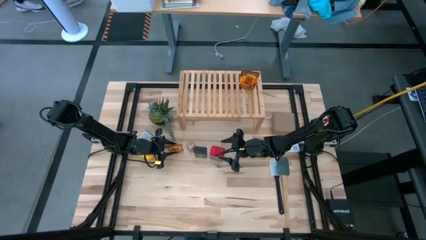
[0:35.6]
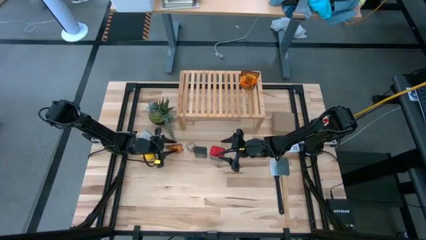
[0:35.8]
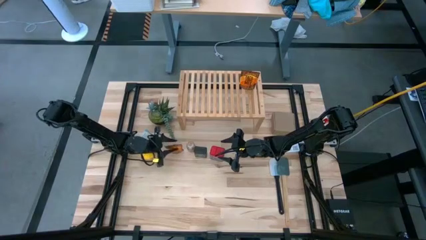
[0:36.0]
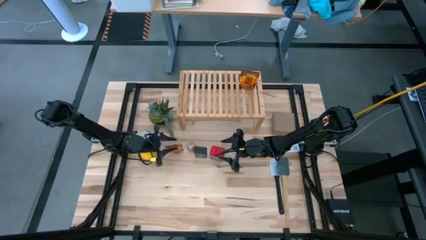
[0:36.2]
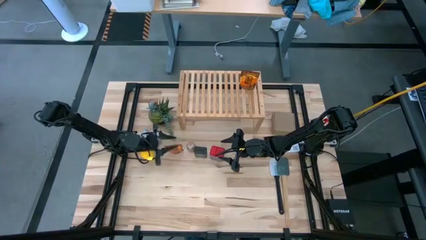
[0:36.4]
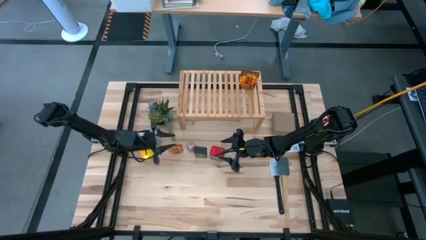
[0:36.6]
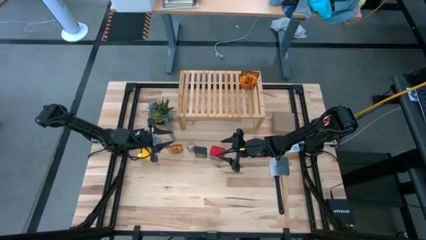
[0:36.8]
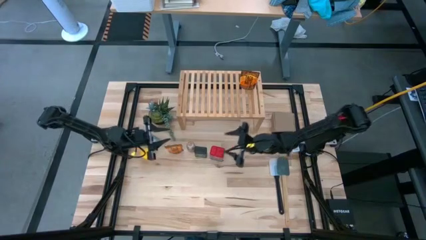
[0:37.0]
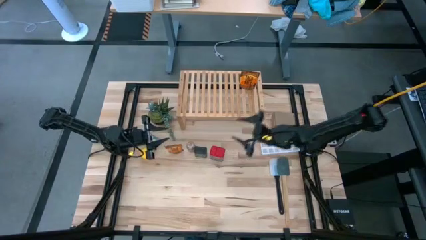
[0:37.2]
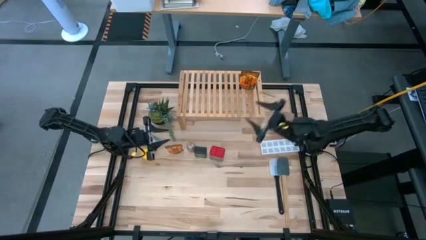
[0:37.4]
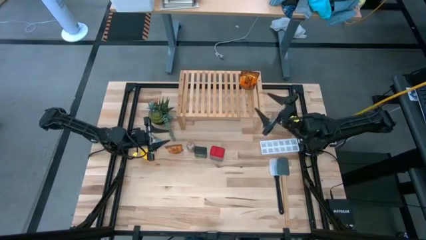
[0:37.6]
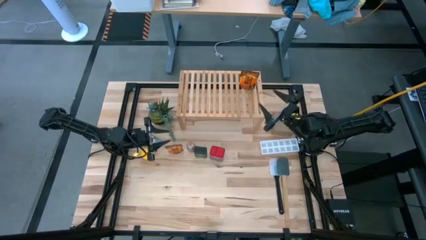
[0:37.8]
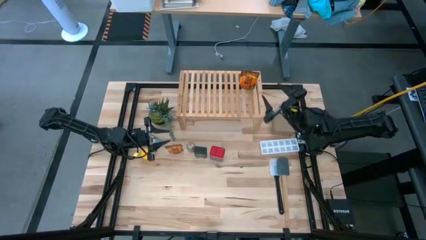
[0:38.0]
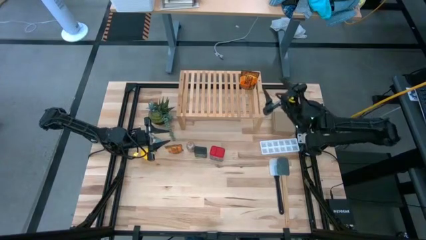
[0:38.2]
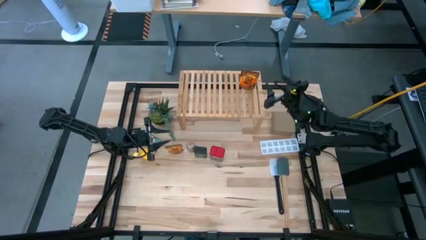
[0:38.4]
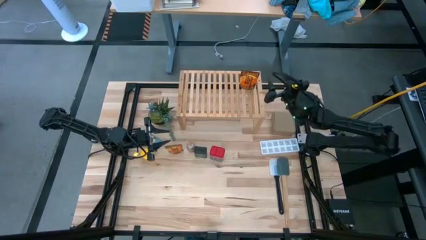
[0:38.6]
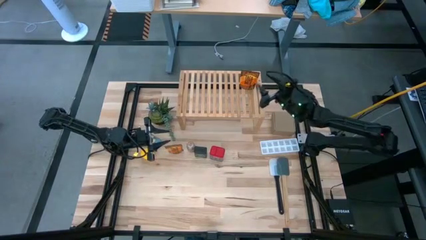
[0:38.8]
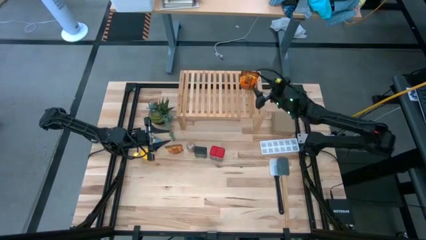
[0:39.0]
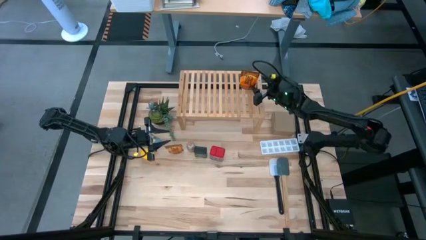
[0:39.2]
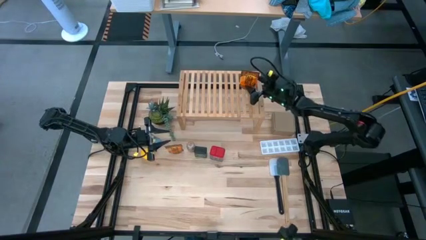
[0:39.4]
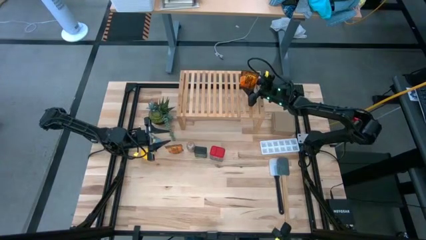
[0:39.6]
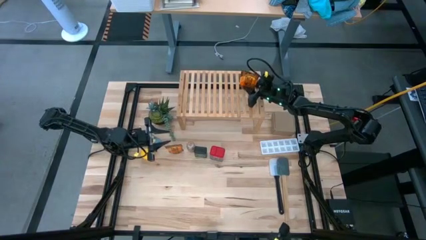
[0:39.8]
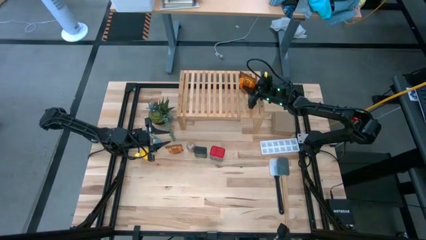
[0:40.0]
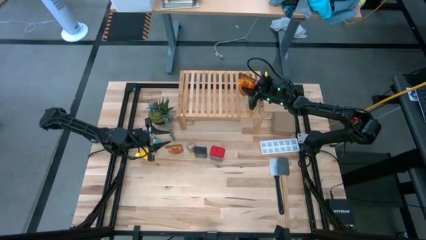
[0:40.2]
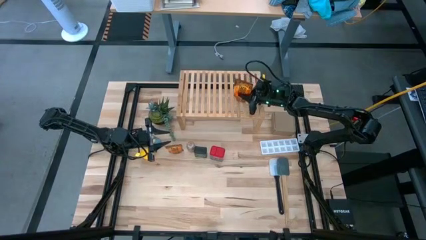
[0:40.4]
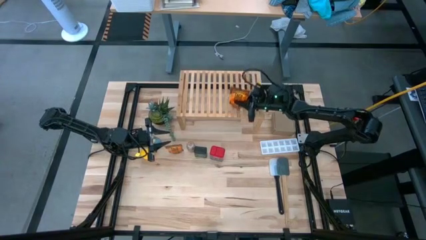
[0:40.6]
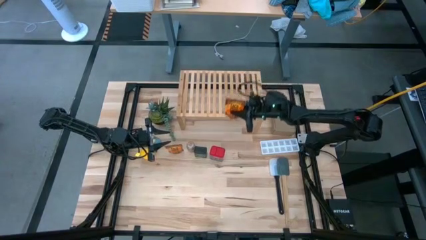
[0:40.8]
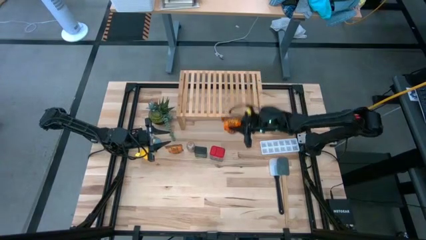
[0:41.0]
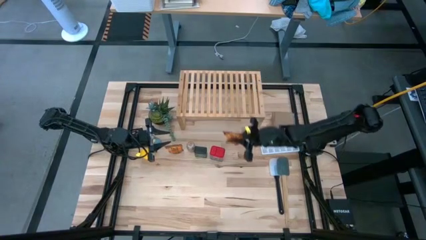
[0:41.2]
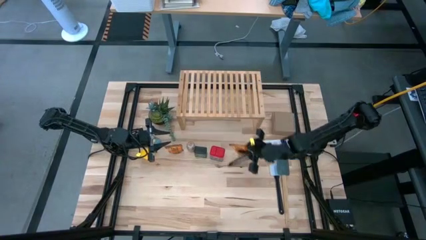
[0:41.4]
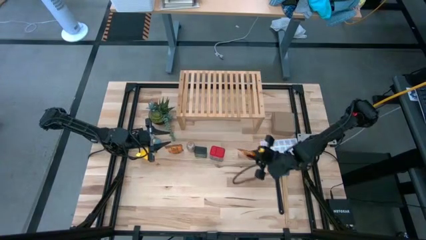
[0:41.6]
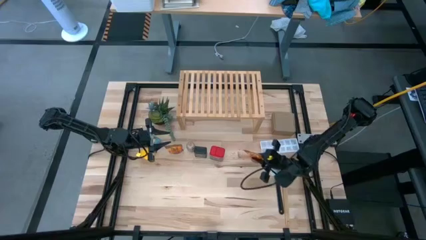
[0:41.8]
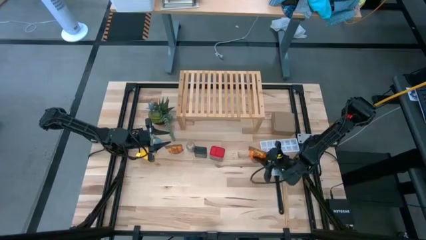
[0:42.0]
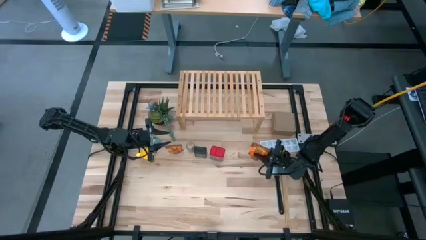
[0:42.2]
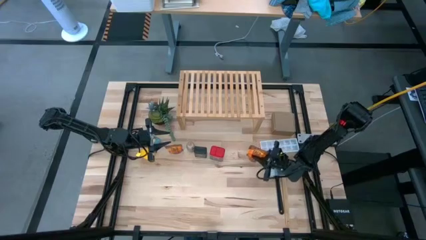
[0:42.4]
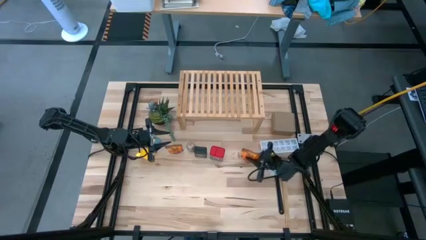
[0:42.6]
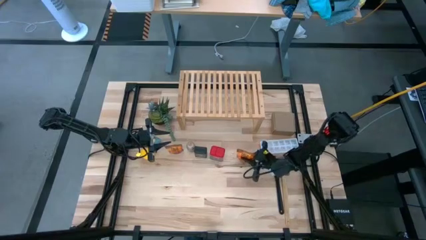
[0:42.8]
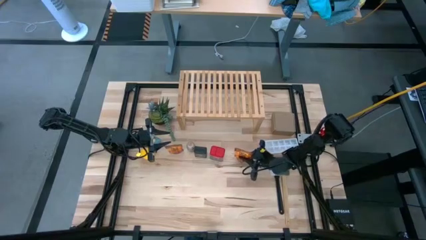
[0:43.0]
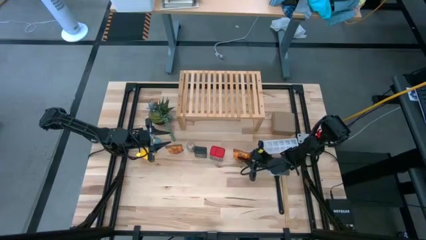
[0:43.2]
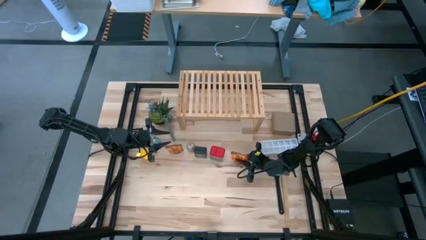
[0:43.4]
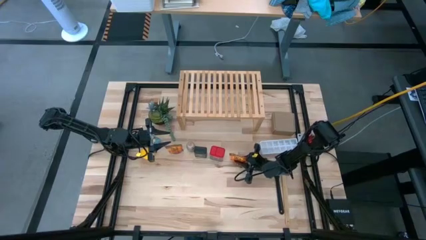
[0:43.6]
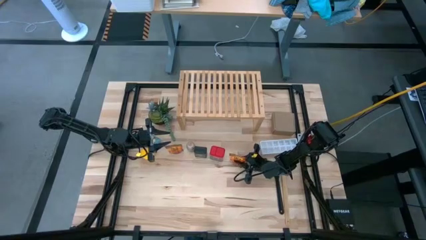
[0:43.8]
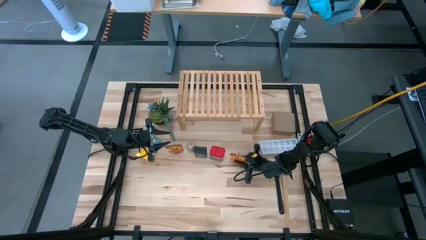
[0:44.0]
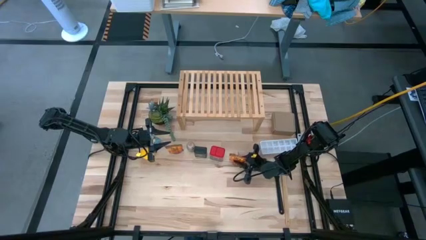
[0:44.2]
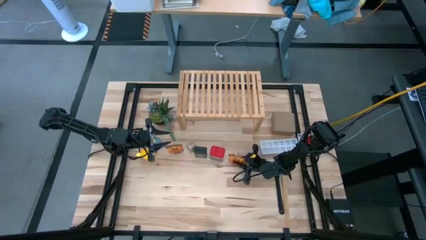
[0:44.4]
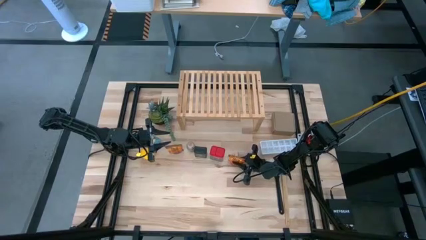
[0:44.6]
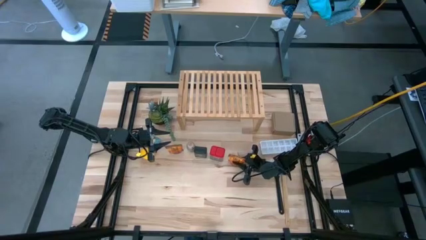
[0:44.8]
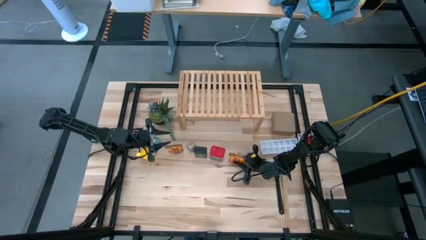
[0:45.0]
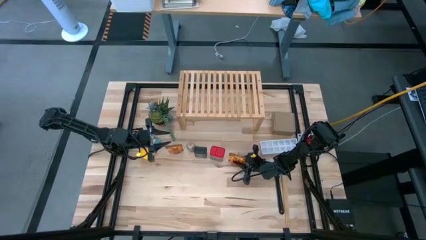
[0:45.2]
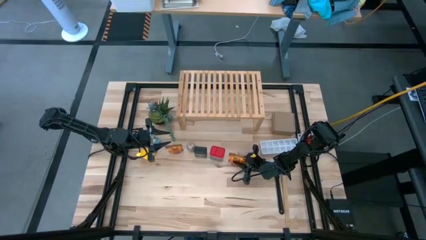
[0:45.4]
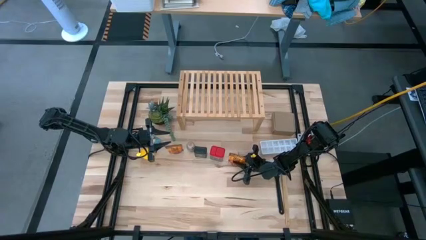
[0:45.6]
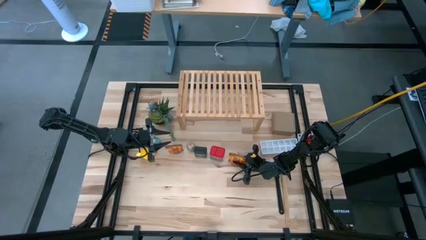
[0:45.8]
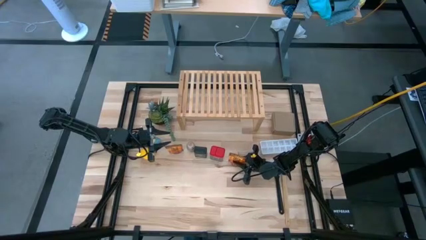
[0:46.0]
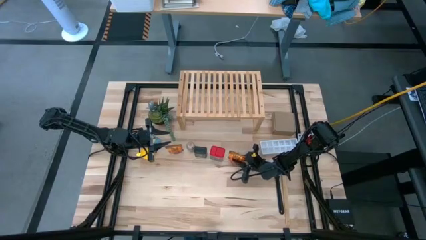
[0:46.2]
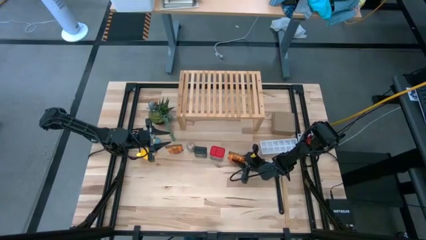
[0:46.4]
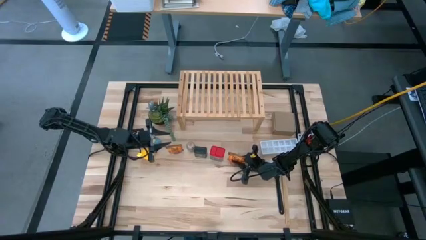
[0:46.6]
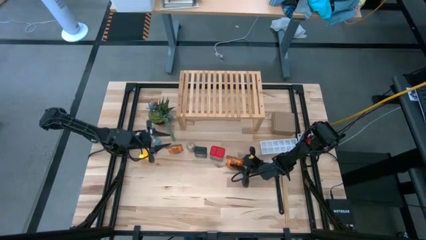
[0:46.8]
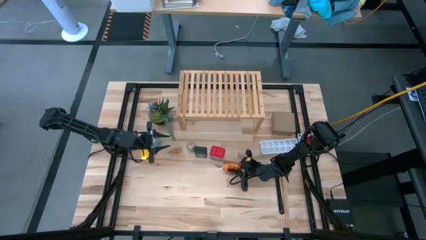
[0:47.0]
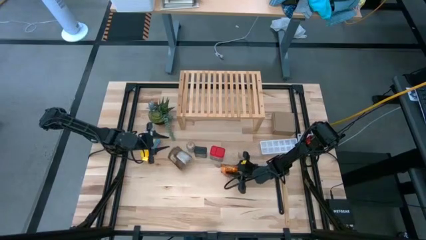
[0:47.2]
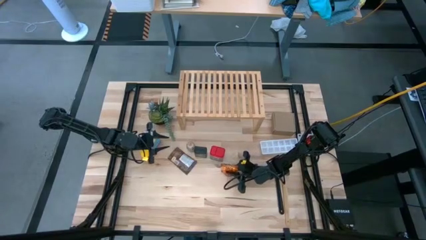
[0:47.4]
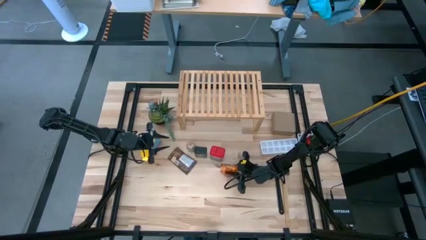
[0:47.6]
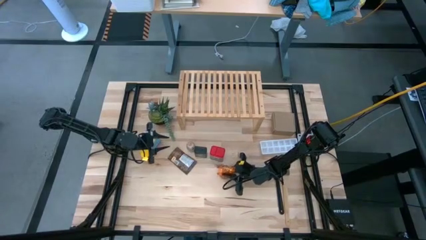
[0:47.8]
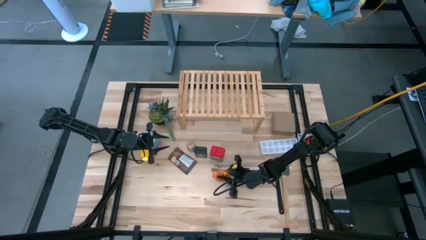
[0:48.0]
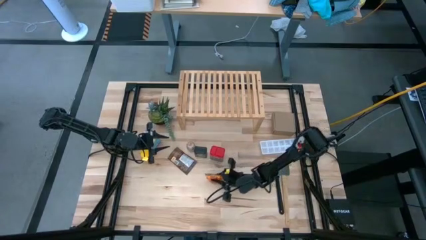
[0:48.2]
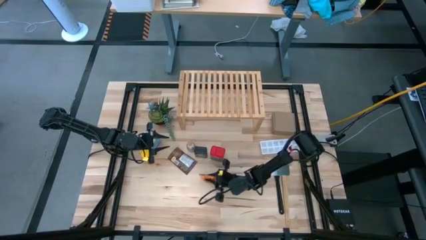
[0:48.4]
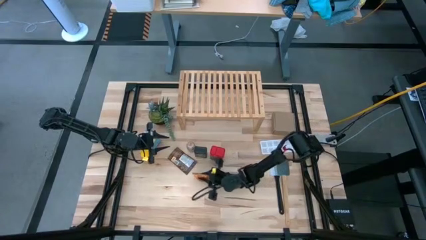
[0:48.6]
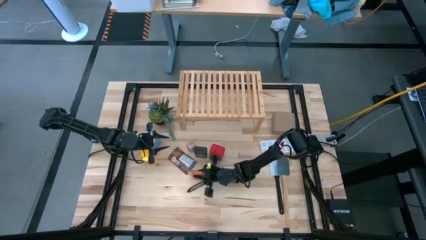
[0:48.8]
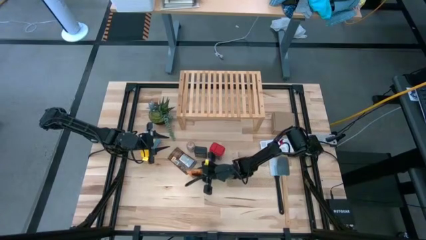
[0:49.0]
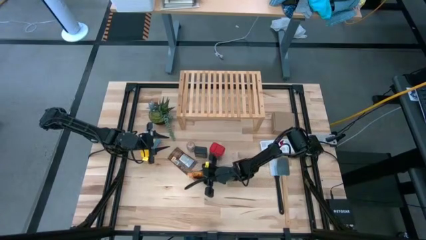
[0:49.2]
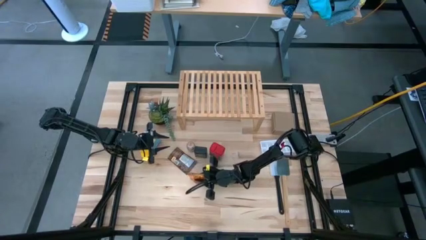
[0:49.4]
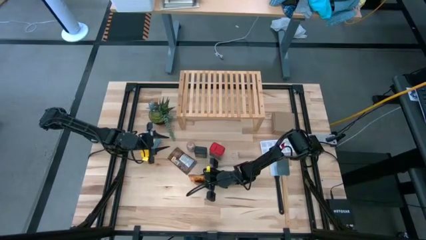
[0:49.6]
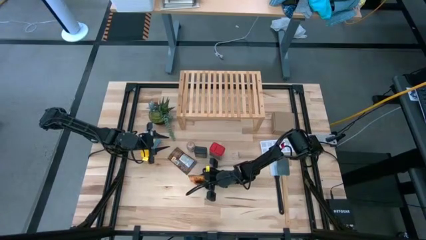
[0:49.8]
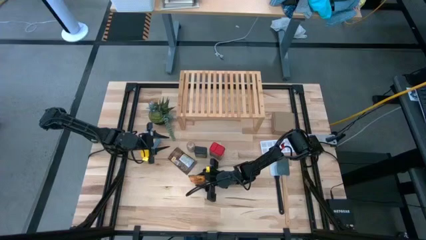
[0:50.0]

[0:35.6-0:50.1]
Task: Shelf spices
Remove the orange seasoning pack from the shelf
